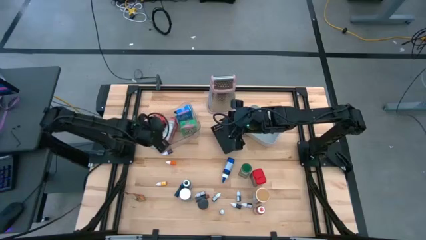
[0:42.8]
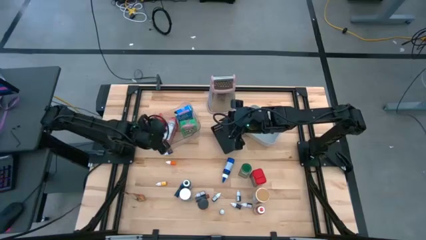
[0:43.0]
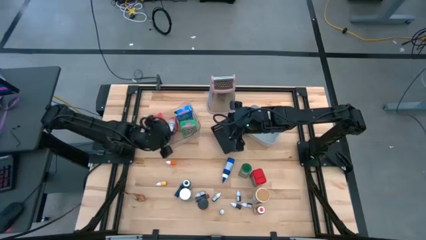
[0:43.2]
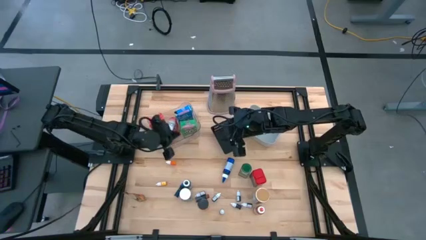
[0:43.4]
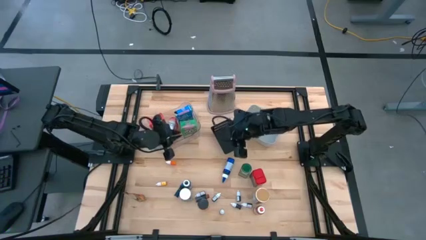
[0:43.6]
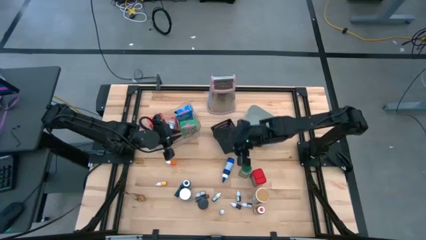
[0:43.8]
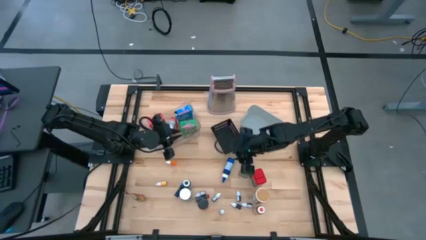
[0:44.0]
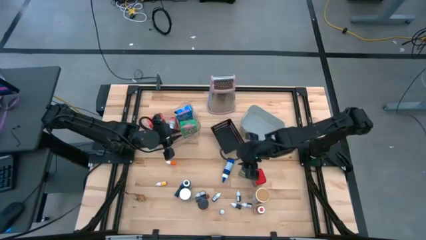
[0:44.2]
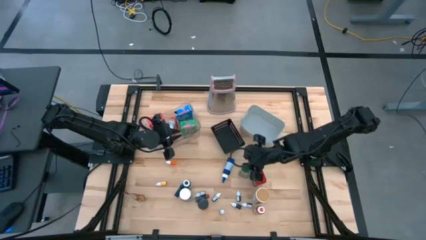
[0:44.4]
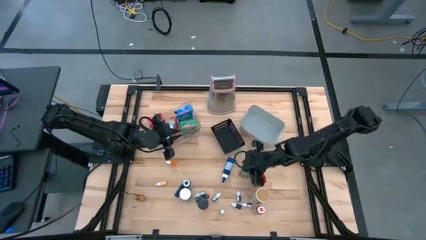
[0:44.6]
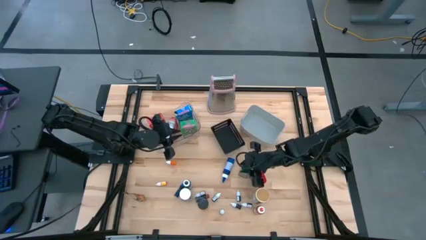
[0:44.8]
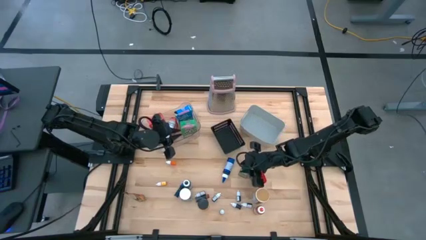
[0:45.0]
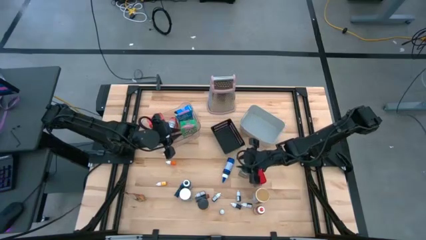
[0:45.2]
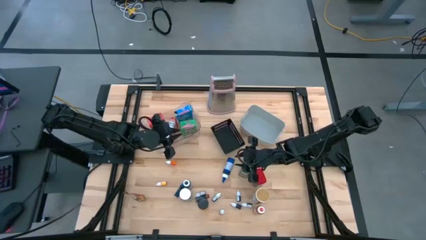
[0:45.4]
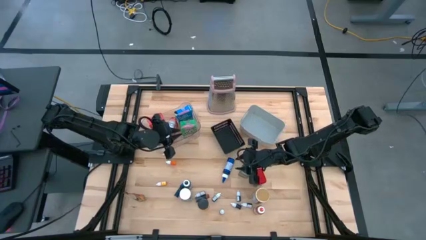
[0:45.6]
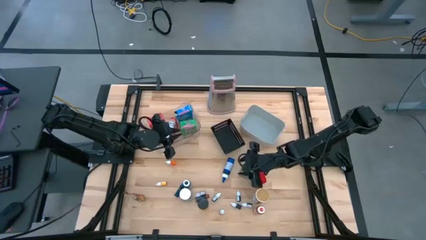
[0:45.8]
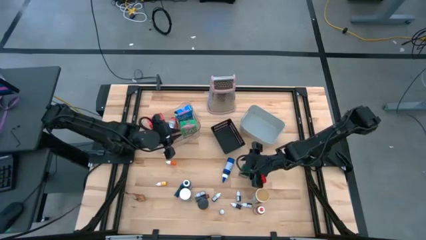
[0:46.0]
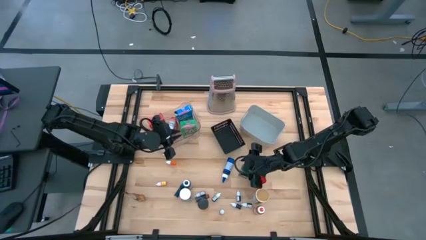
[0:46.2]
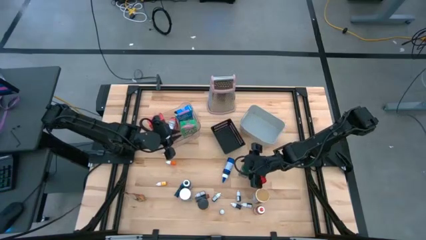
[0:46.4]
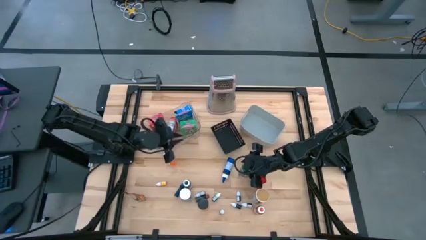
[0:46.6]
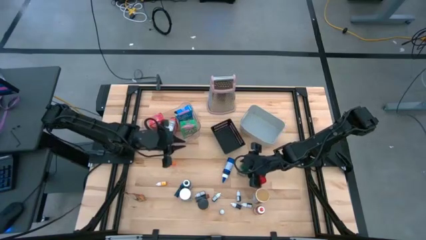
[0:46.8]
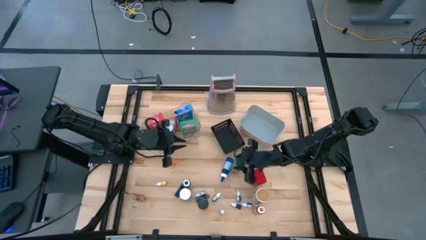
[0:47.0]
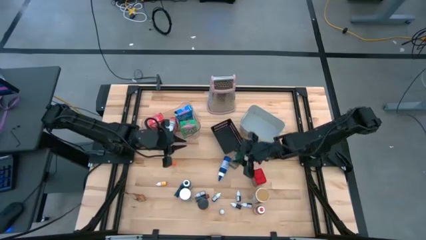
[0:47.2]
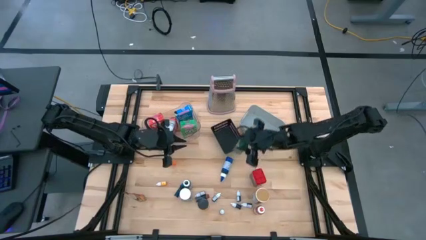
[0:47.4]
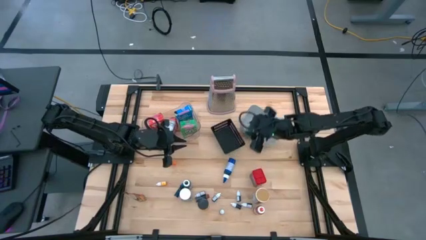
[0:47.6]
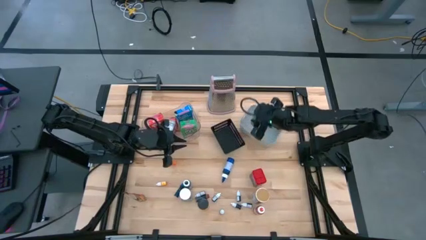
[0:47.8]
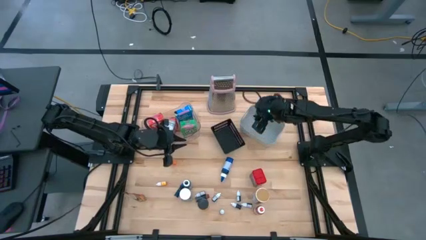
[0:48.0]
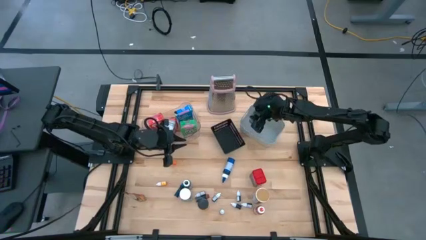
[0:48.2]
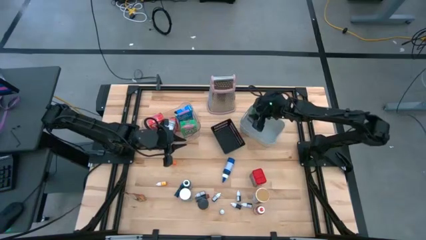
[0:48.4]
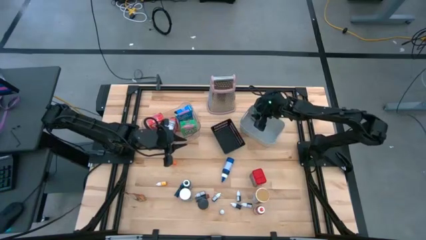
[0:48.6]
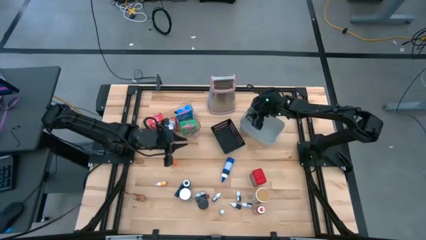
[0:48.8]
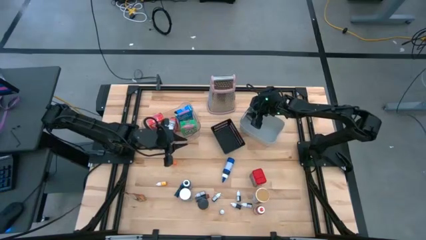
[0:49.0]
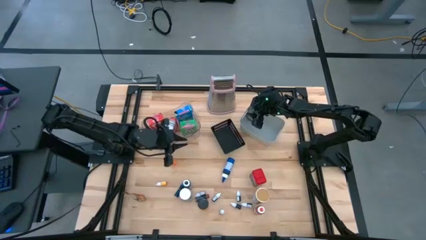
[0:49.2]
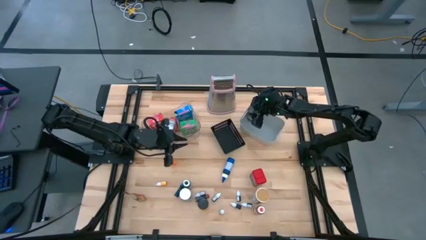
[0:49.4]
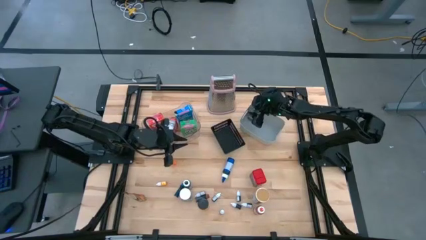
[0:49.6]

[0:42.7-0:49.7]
Task: Pick & Place Kitchen Items
Put the green seasoning bottle into the gray bin

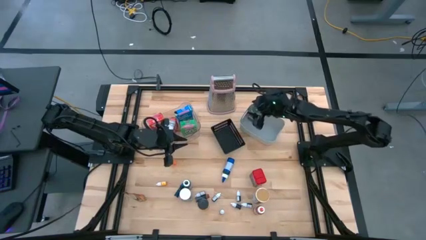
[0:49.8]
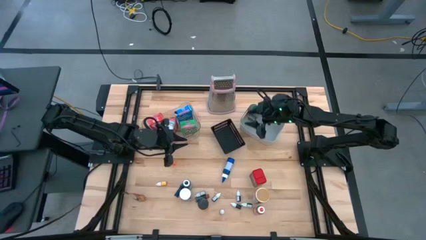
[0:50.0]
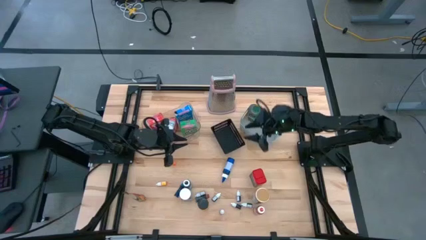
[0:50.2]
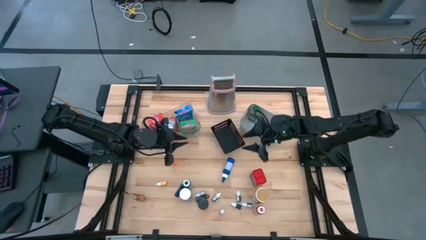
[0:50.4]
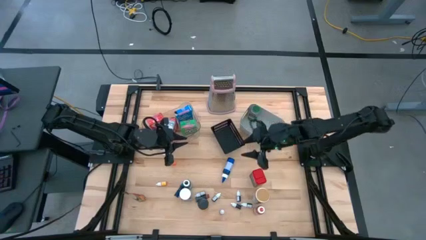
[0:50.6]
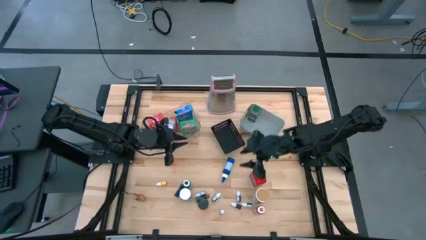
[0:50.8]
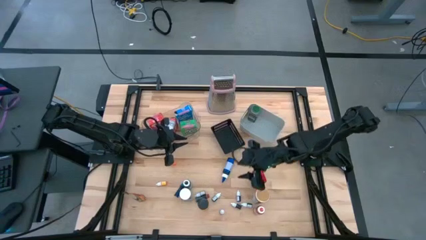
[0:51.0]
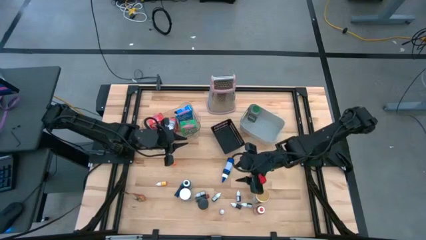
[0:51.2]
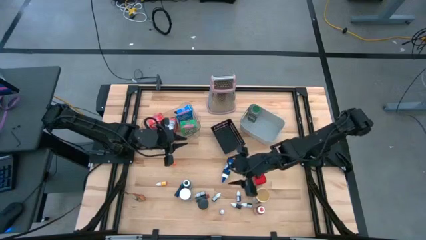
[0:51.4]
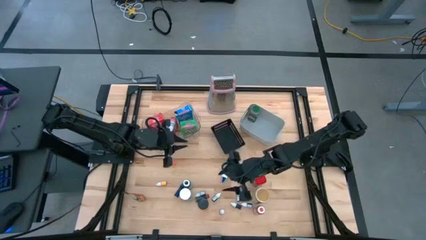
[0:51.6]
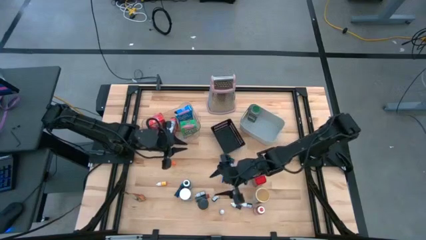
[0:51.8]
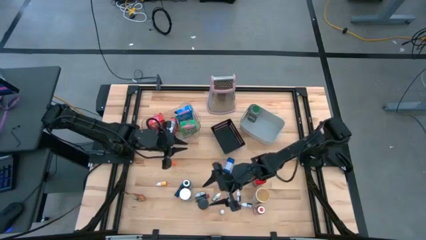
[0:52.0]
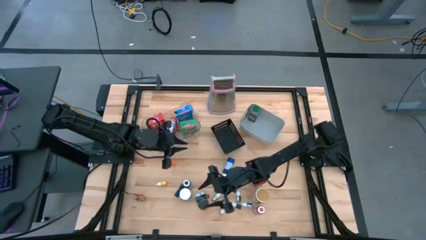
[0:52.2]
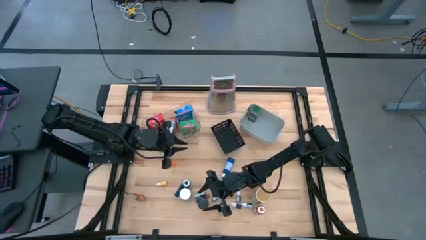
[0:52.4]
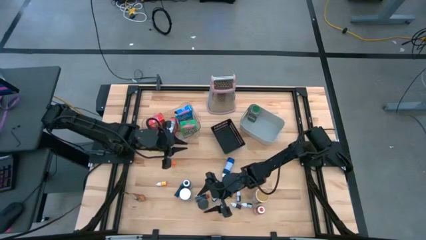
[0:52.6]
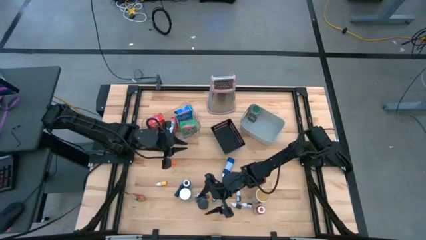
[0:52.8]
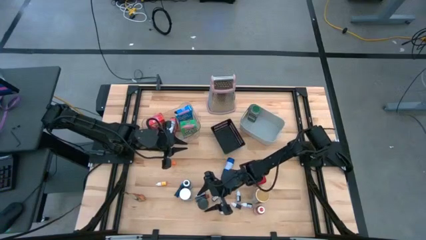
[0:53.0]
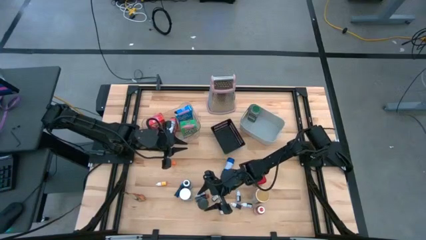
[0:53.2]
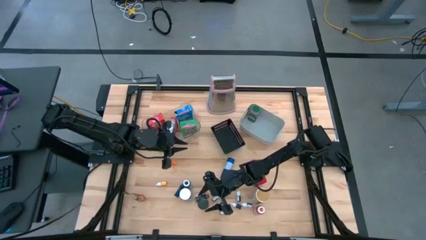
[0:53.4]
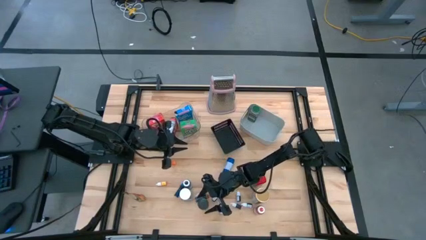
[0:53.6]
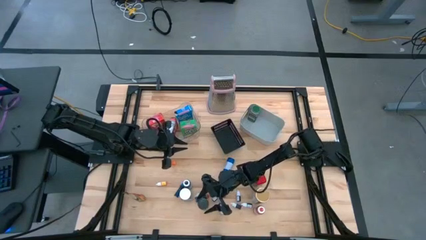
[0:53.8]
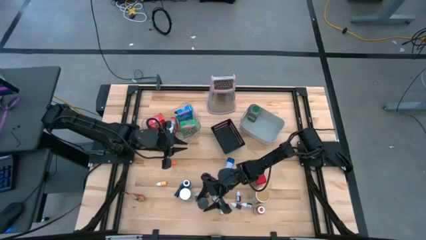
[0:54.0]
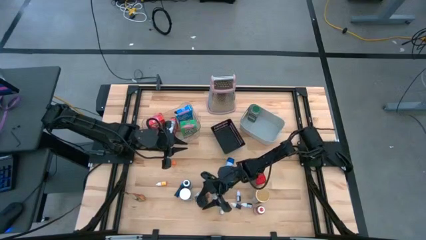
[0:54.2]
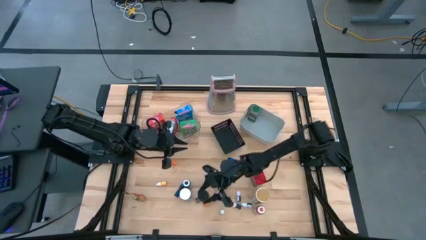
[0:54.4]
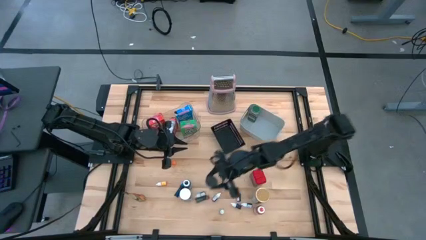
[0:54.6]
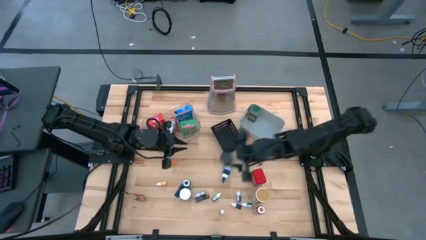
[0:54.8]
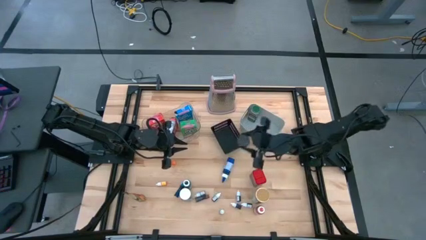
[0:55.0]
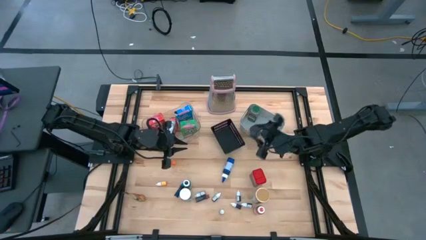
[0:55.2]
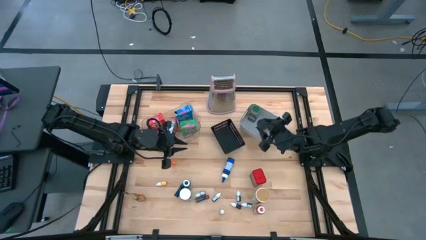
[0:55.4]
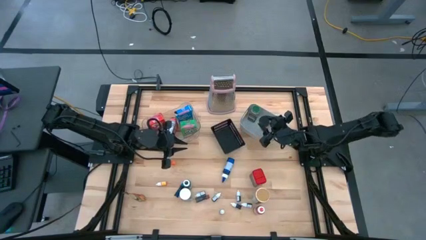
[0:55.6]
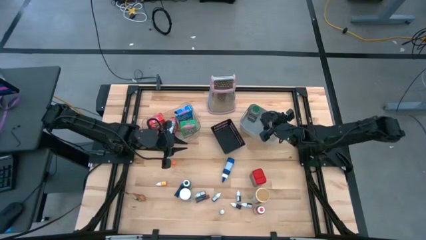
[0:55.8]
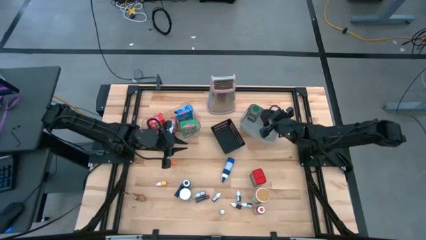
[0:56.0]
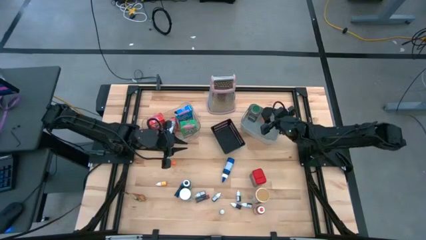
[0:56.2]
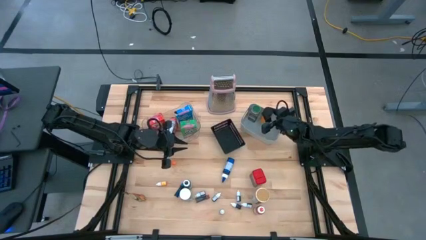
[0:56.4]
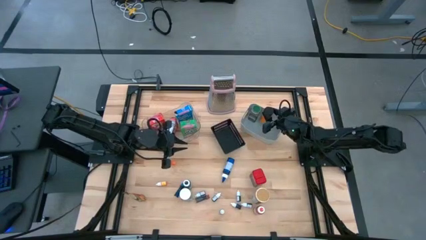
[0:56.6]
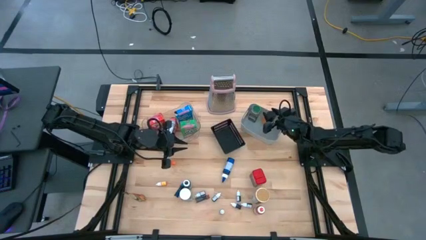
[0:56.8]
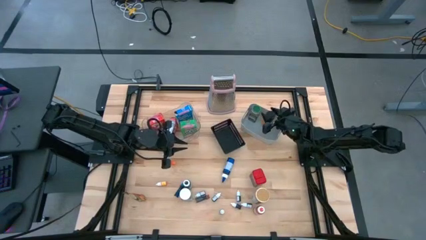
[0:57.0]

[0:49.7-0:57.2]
Put the small black seasoning bottle into the gray bin
